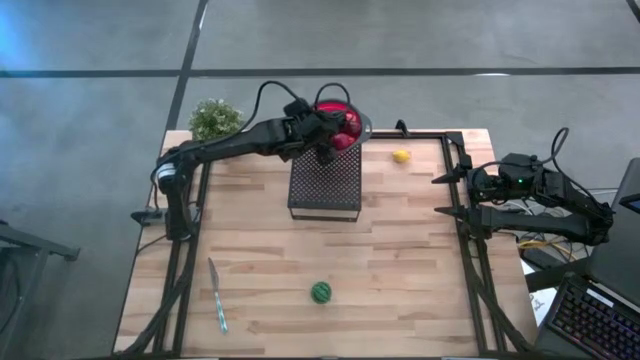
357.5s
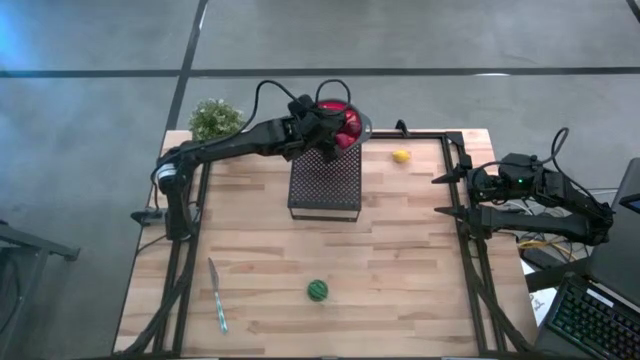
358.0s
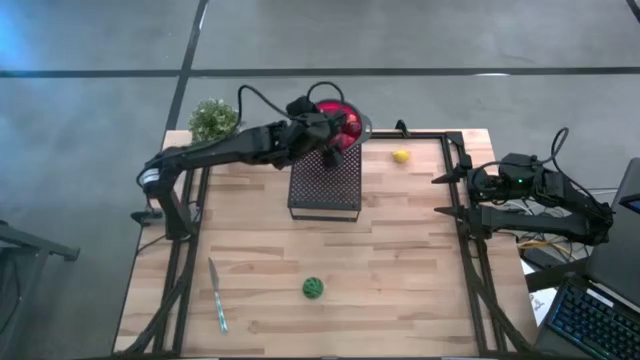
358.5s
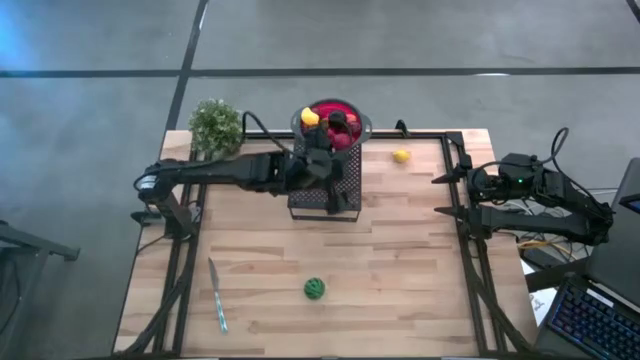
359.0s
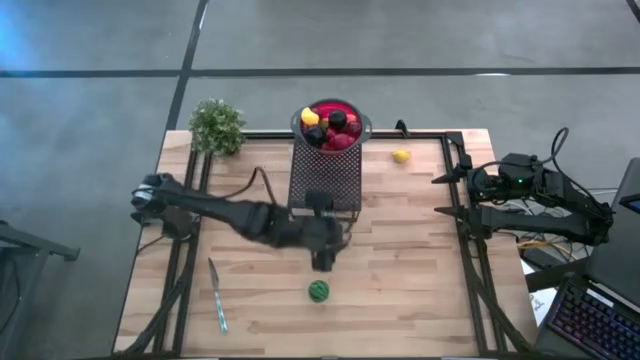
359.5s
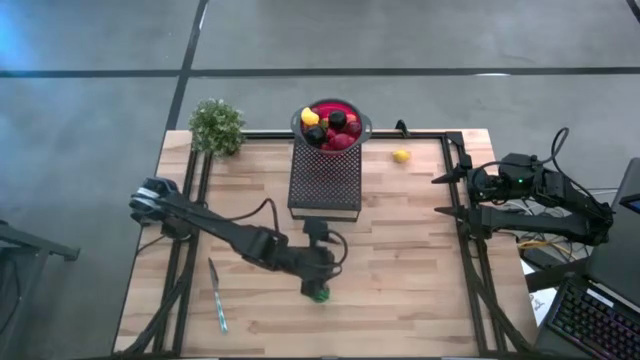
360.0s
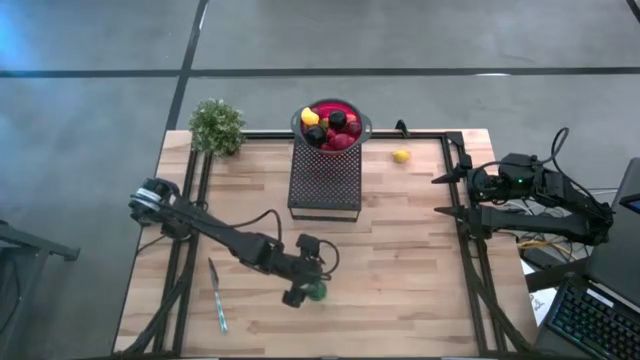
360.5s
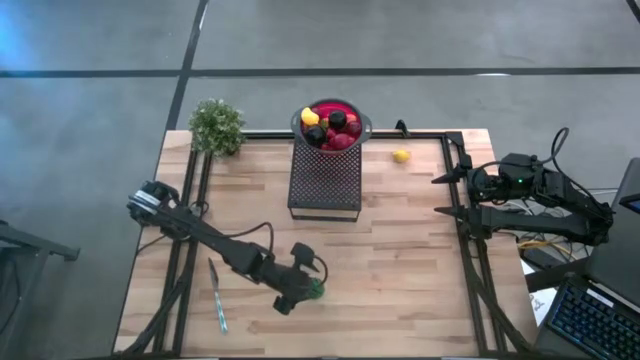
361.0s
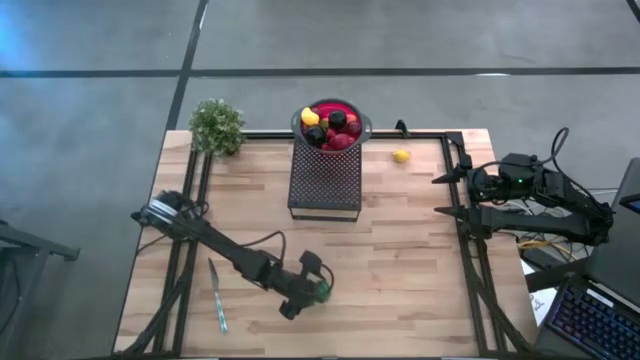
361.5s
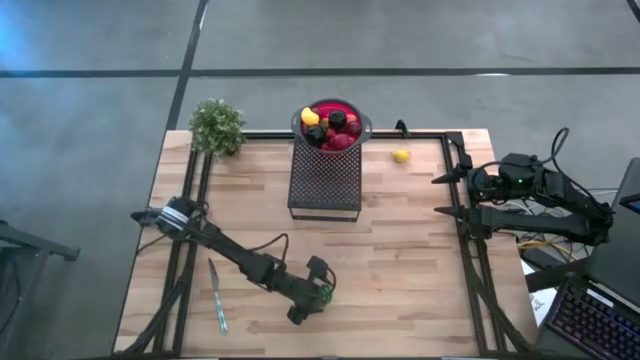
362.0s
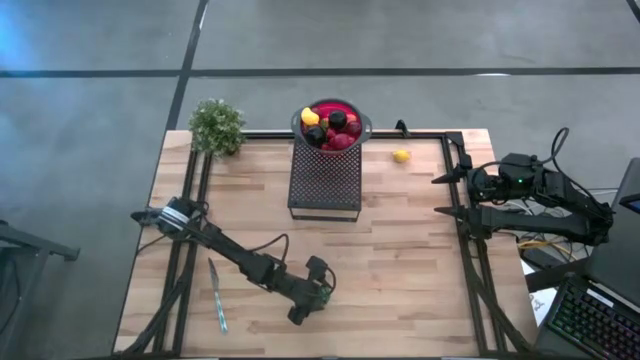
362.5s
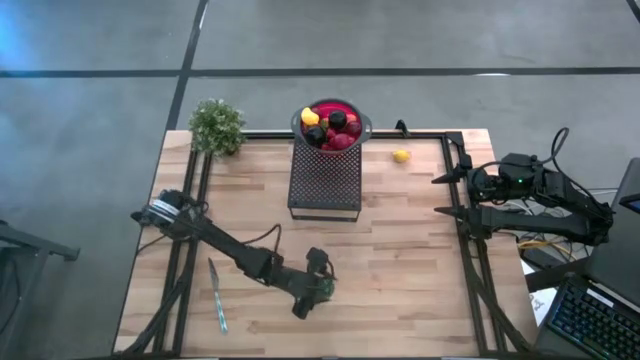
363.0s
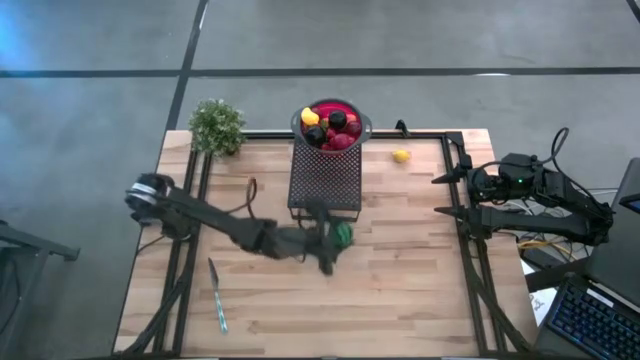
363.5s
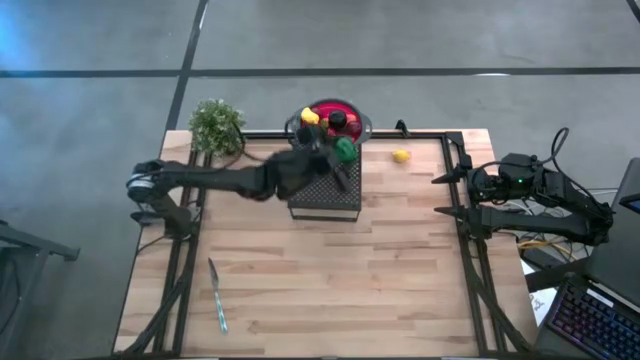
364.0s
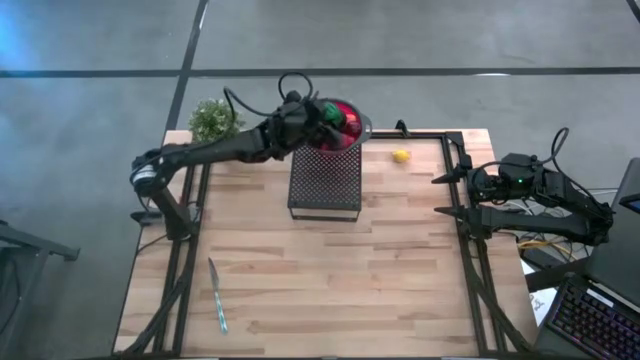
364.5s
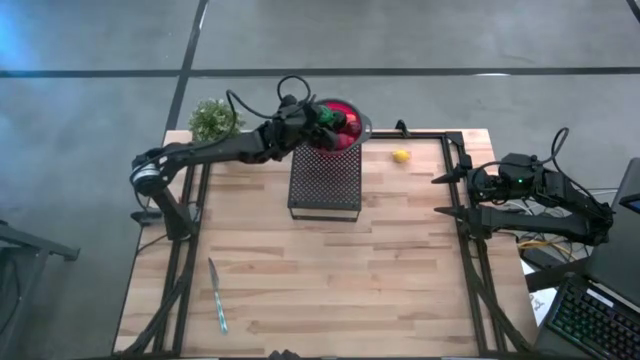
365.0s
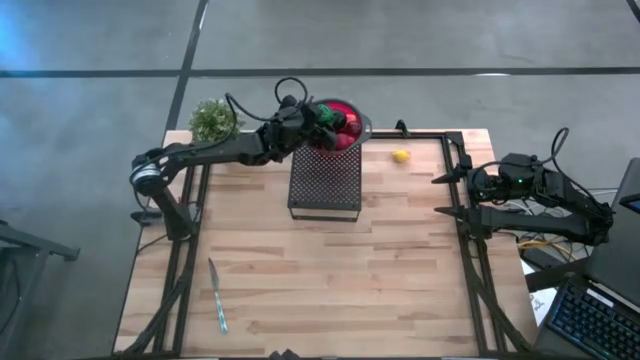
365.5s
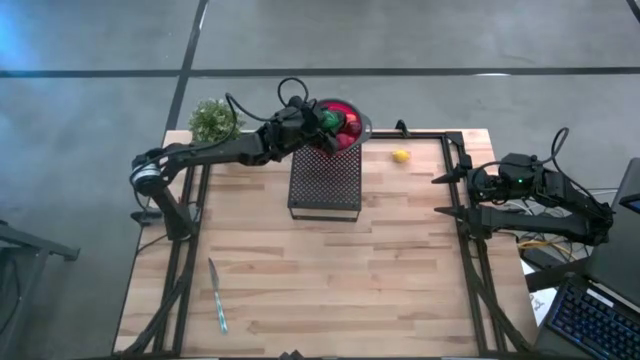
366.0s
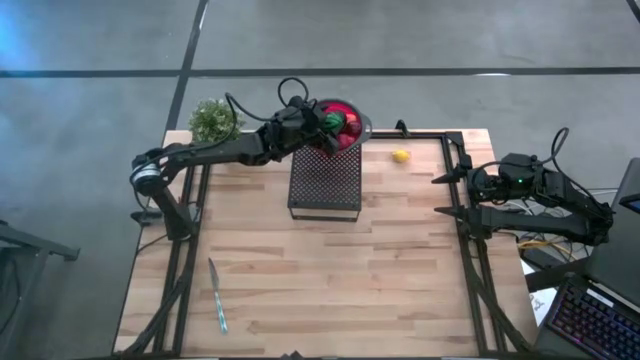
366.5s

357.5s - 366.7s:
Task: Pick & Place Fruit
Put the watermelon into the red strainer bowl on the shelf

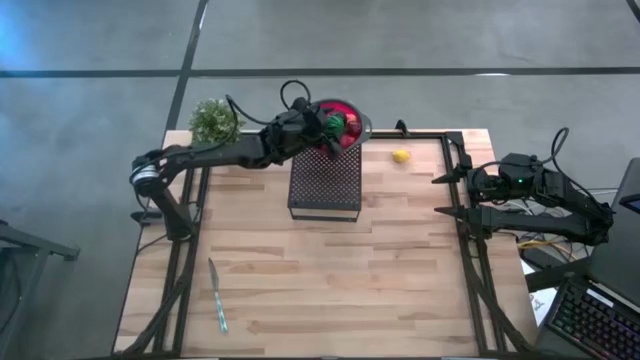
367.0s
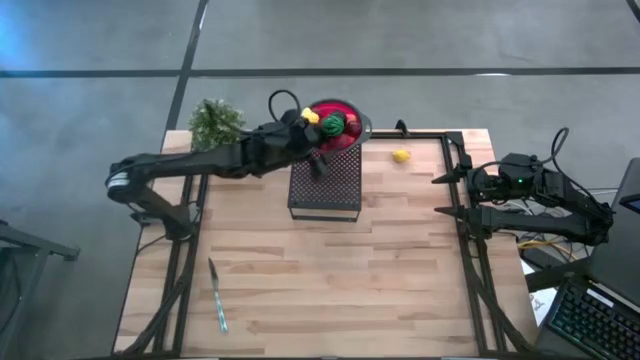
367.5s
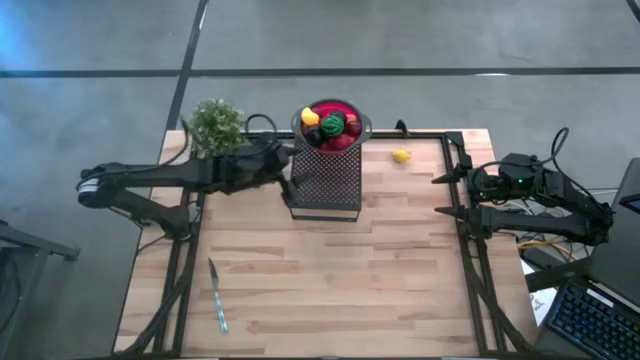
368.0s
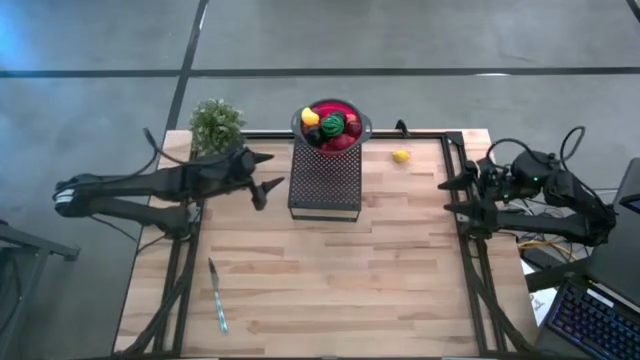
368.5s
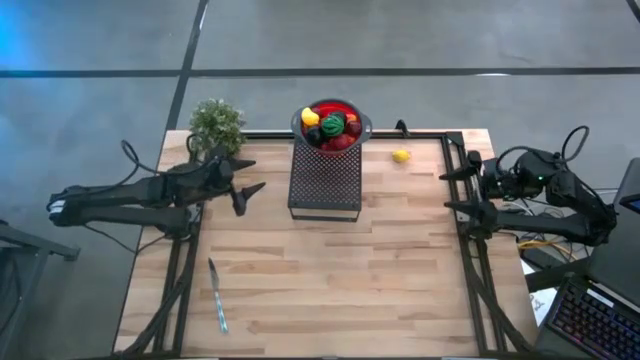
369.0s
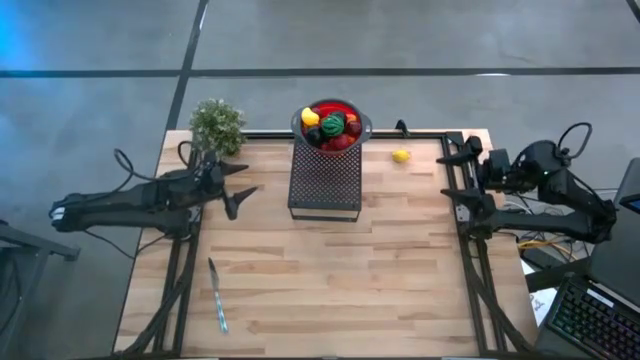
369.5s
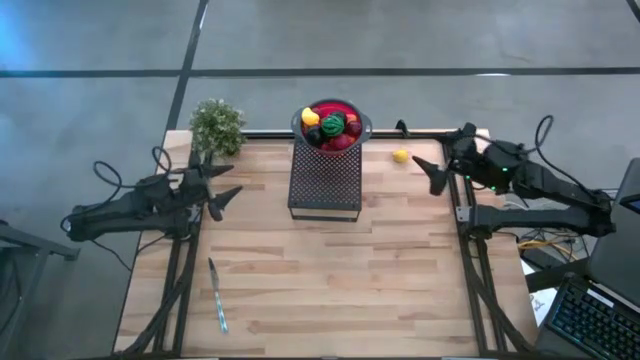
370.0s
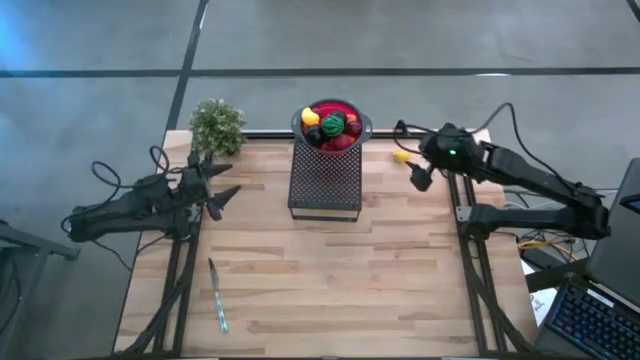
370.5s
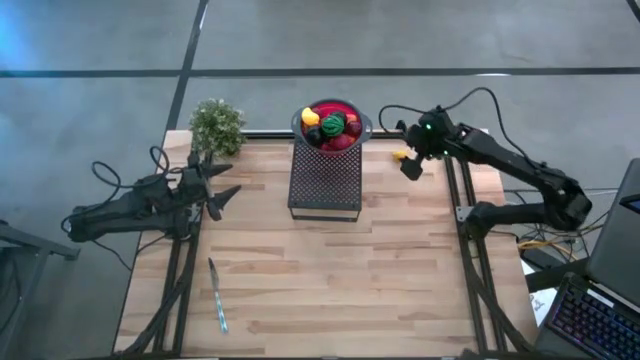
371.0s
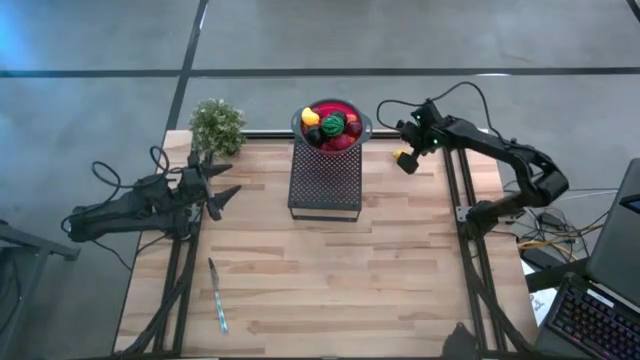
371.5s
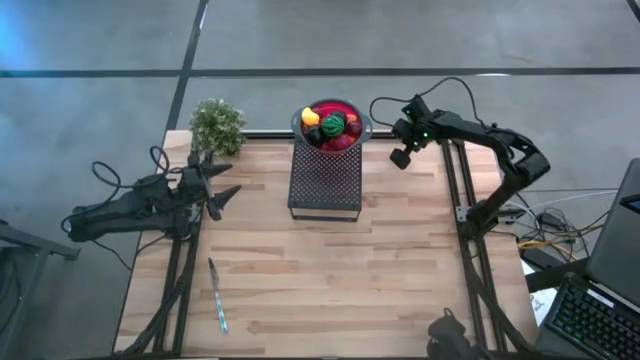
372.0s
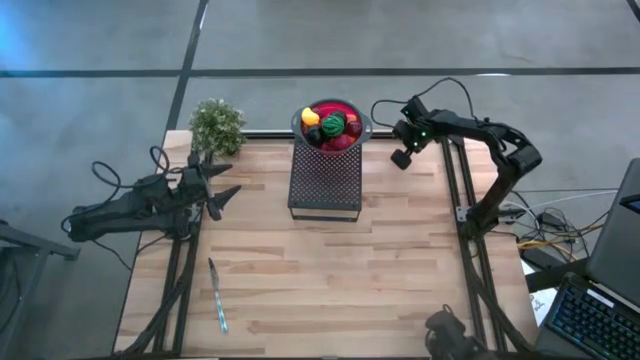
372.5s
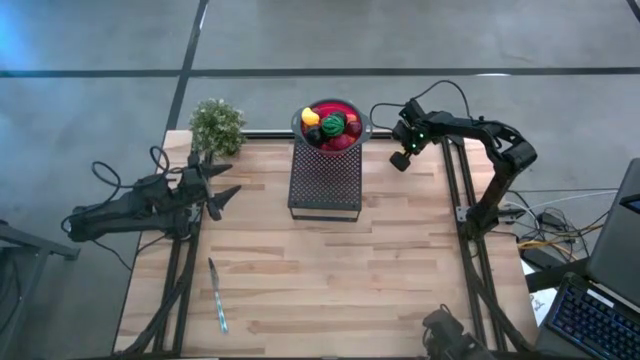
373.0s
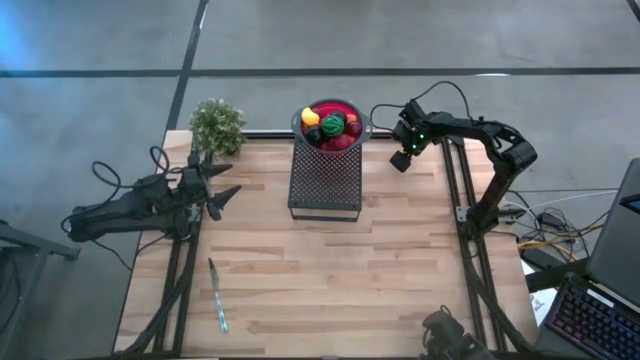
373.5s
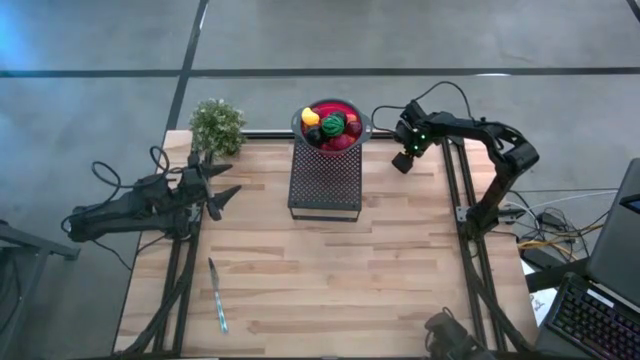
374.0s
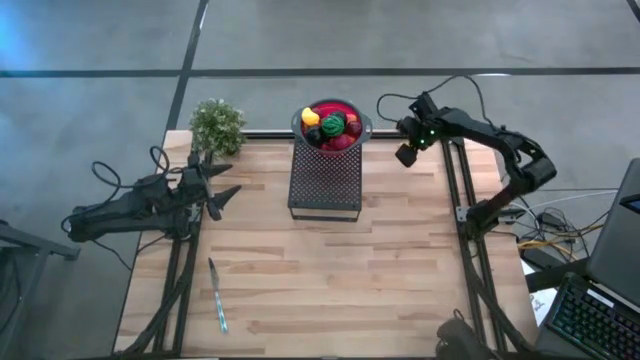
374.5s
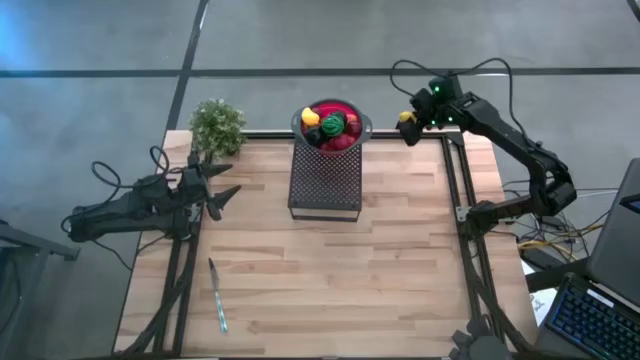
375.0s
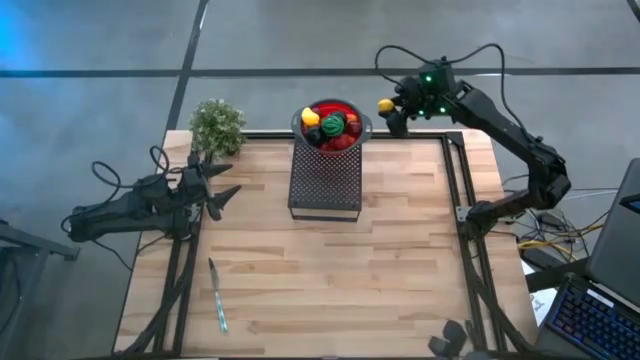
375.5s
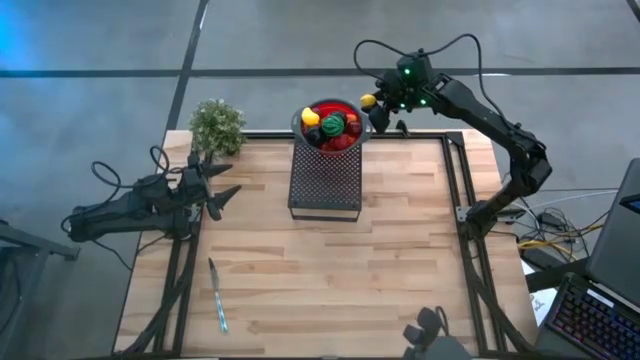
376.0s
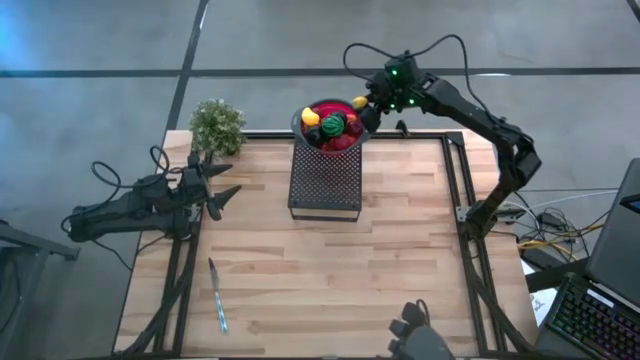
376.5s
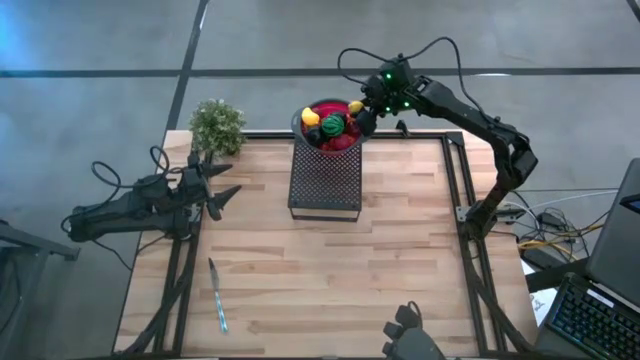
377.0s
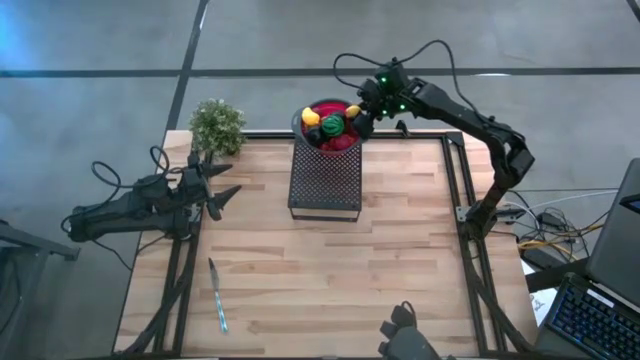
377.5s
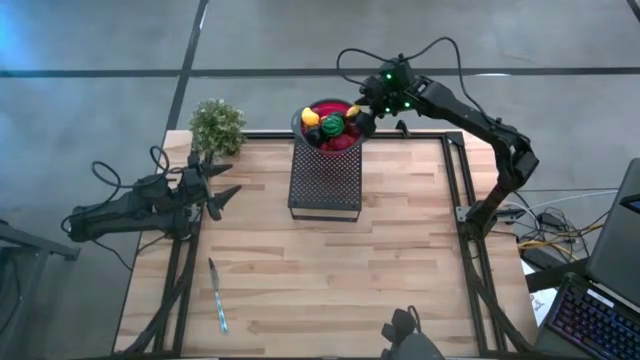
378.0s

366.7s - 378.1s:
Put the lemon into the red strainer bowl on the shelf

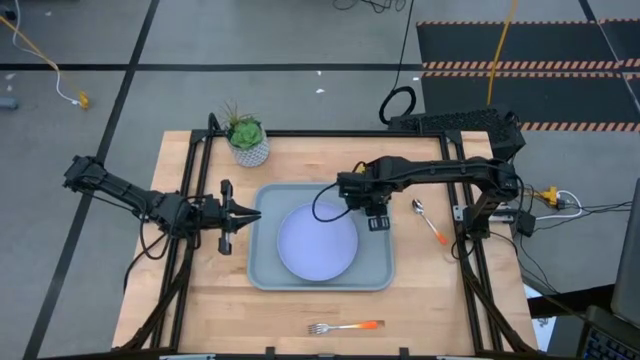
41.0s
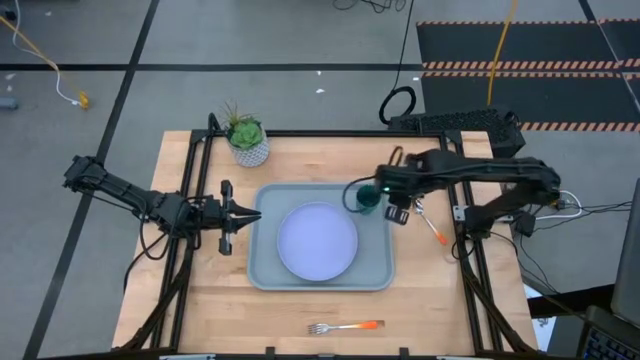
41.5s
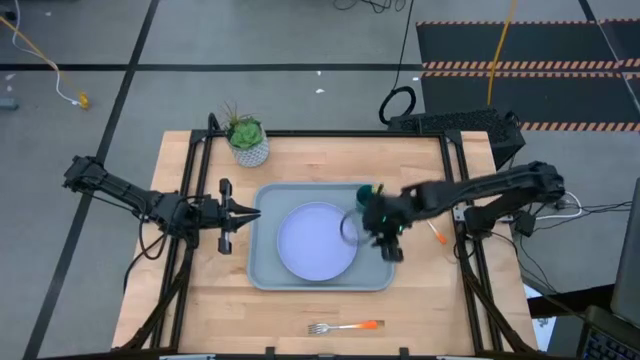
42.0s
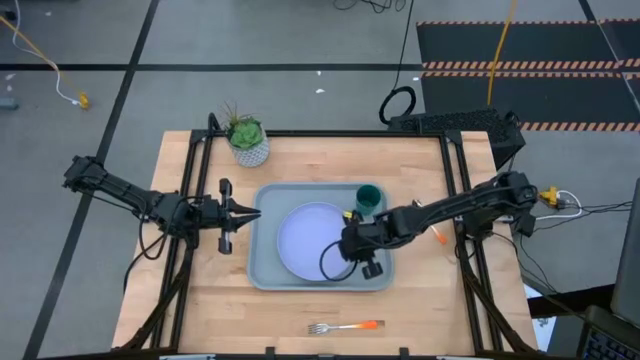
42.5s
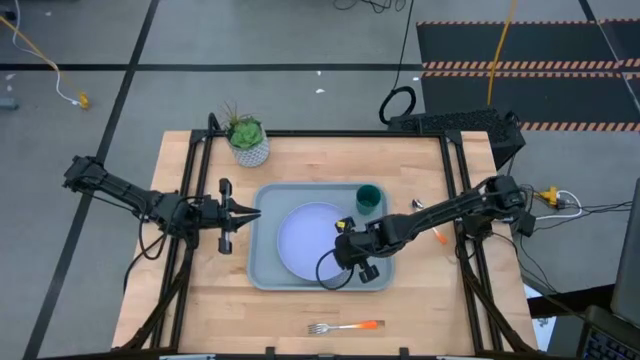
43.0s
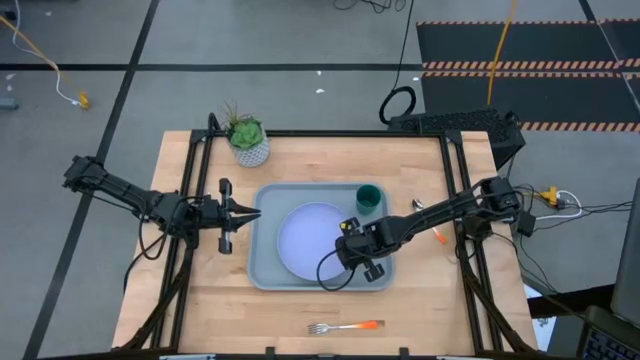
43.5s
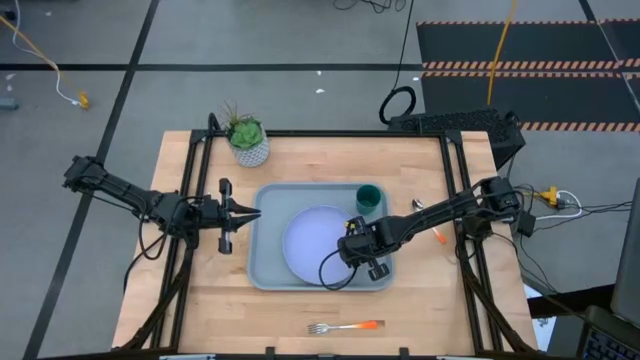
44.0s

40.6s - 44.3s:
Task: Pick and place plate/cup/fork/spoon on tray
Adjust the blue plate on the blue tray
